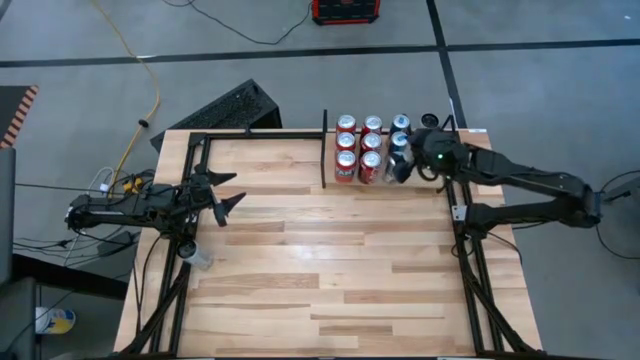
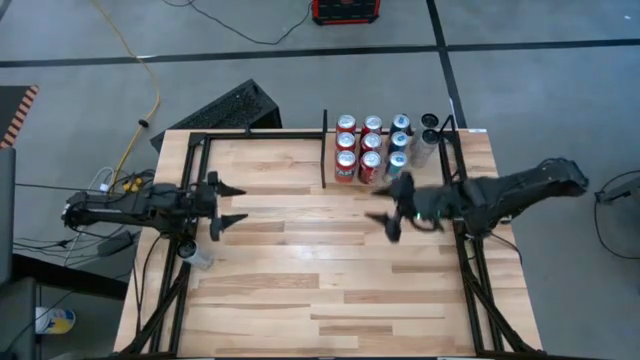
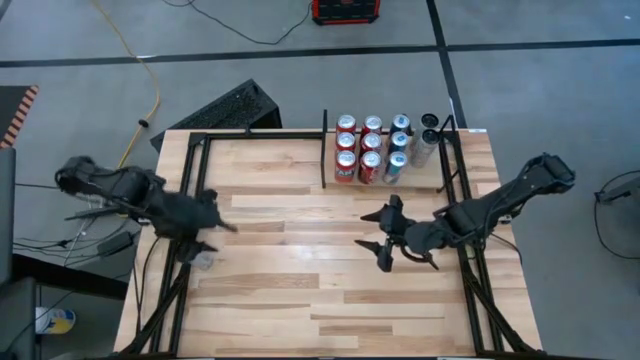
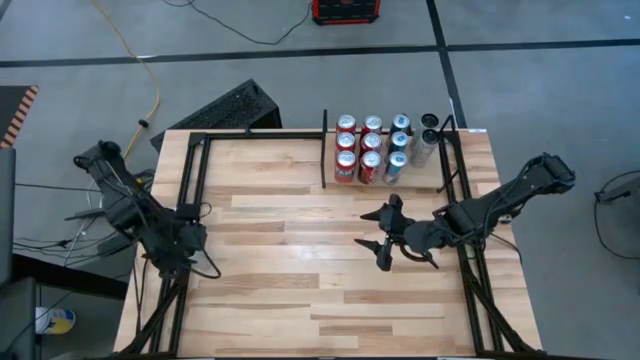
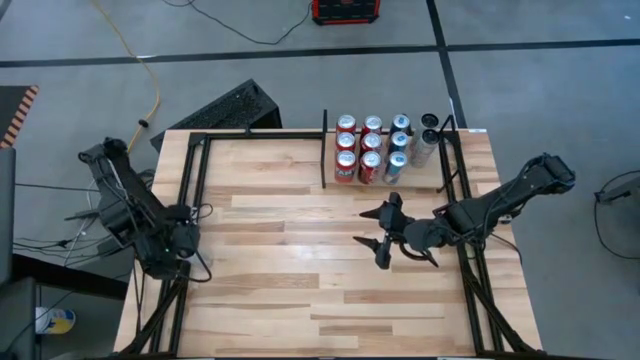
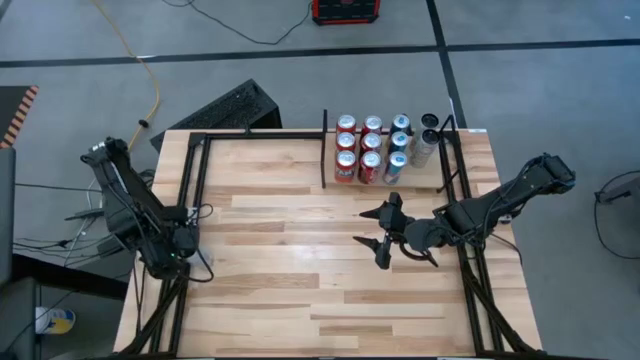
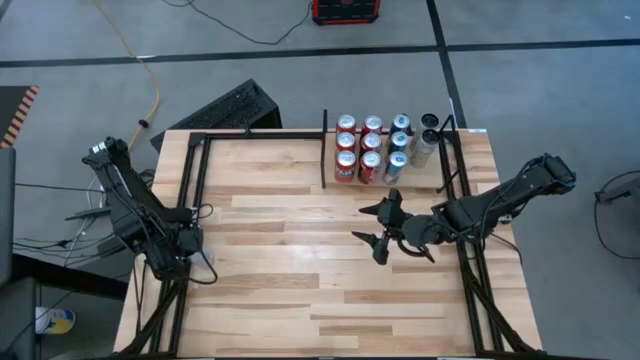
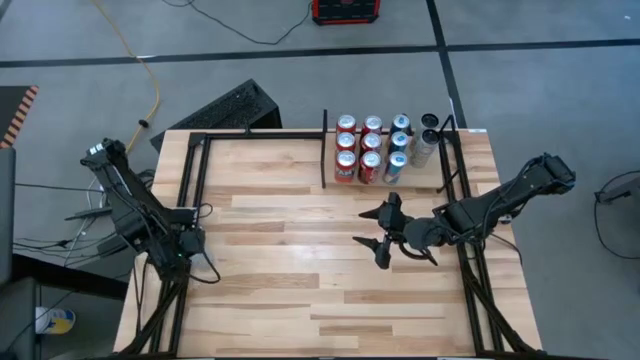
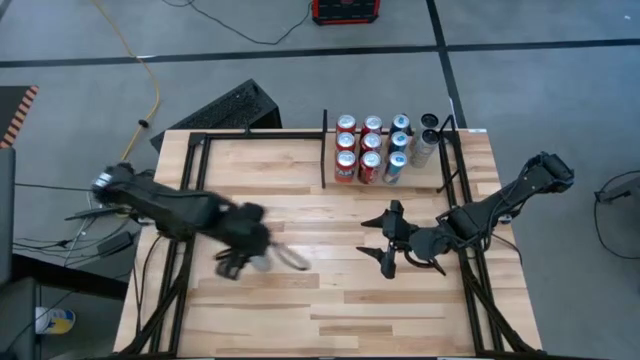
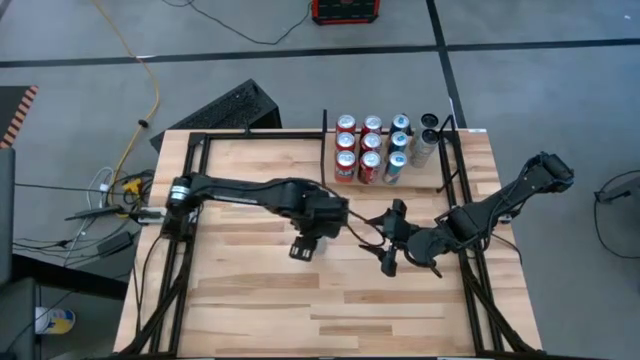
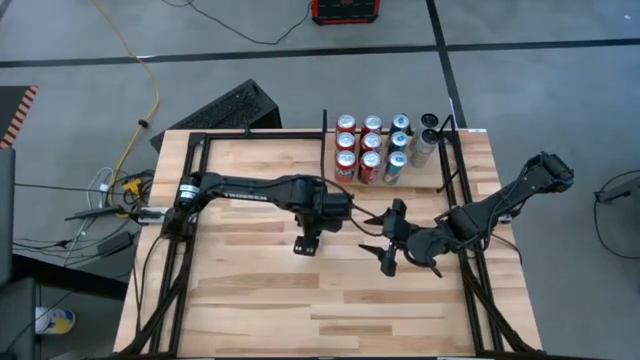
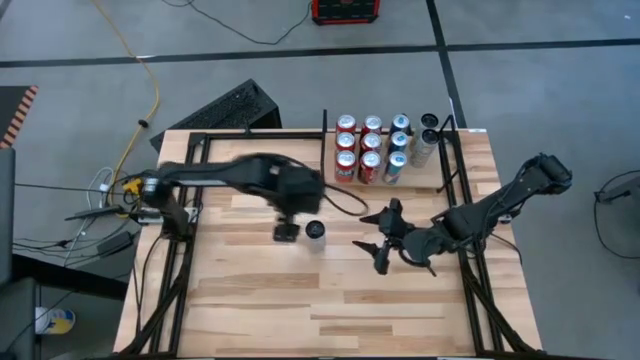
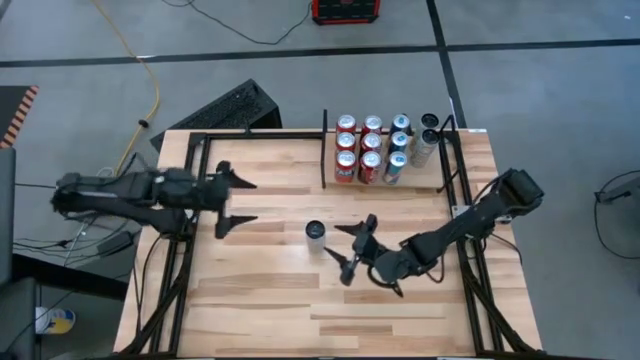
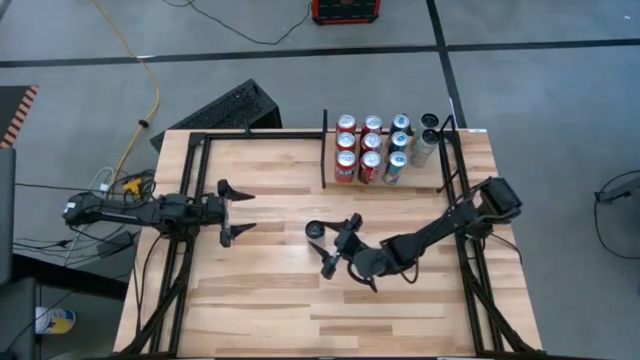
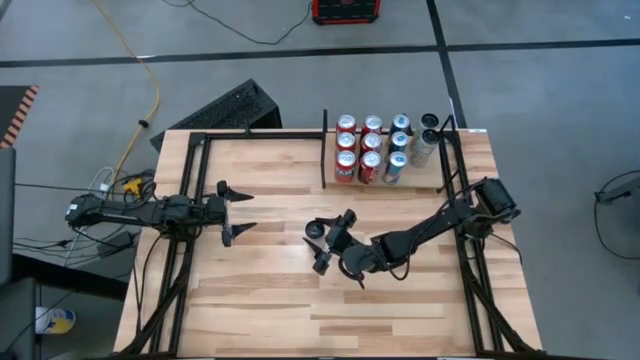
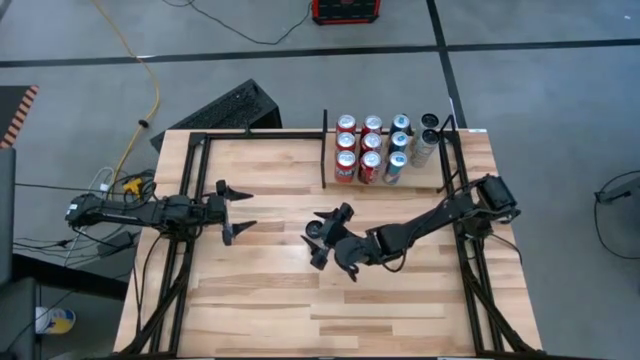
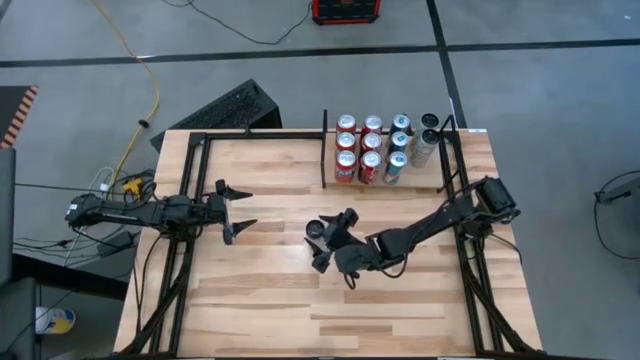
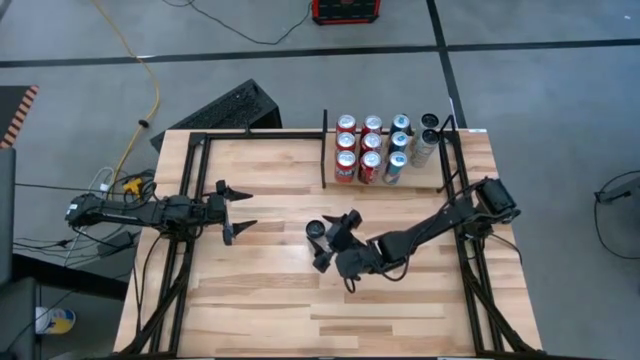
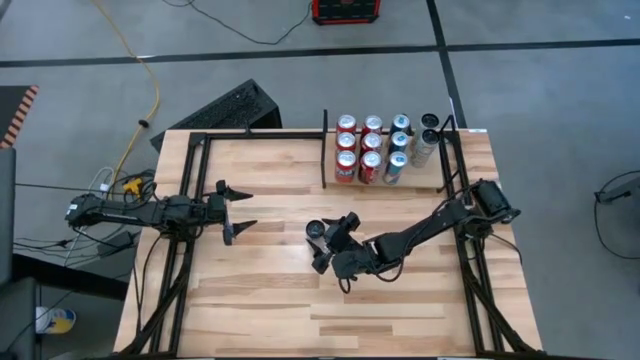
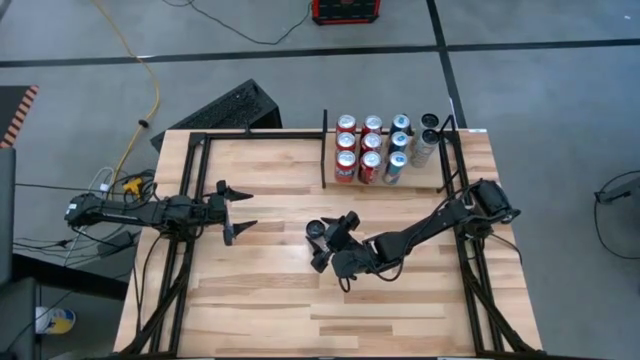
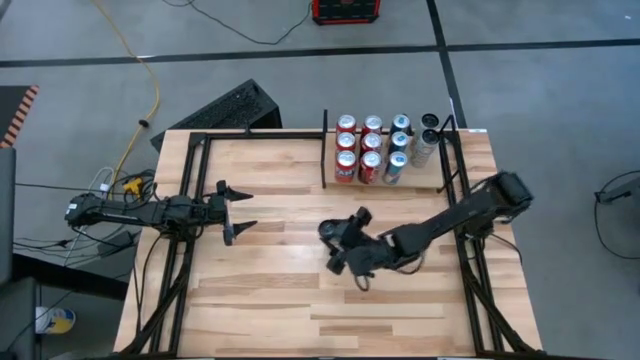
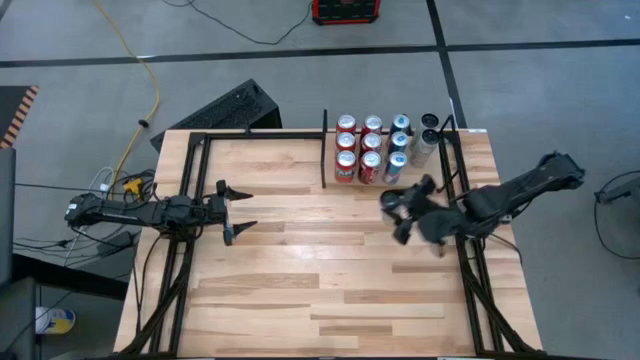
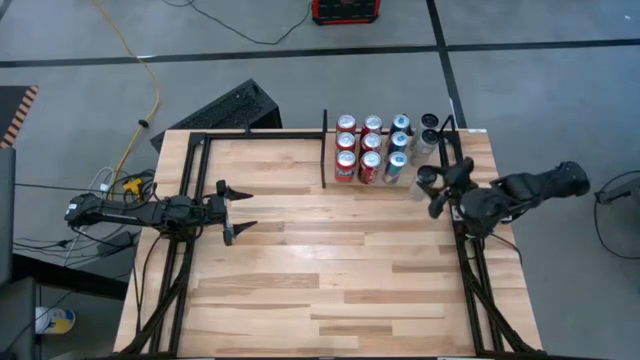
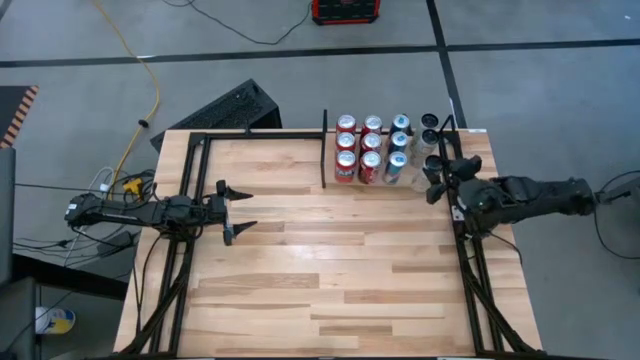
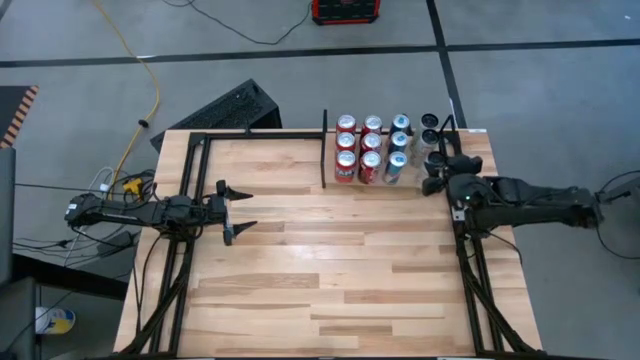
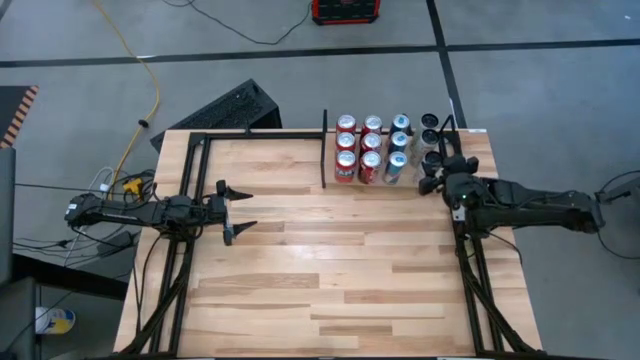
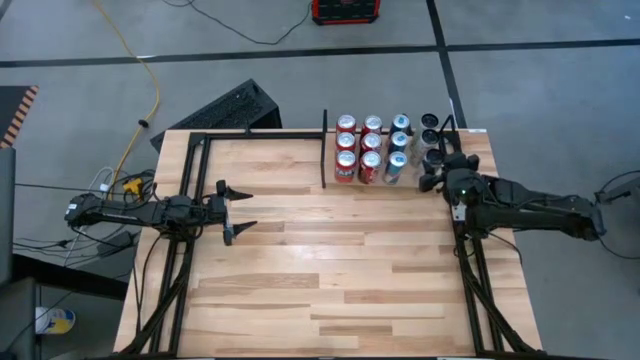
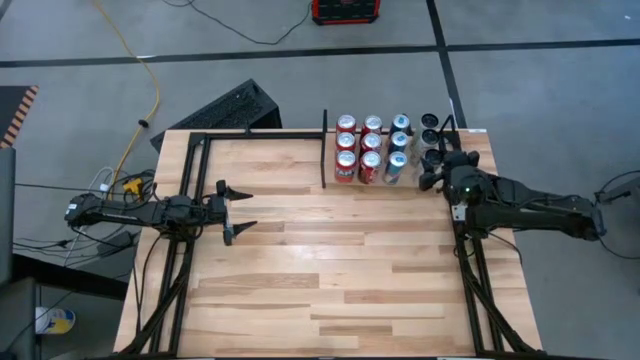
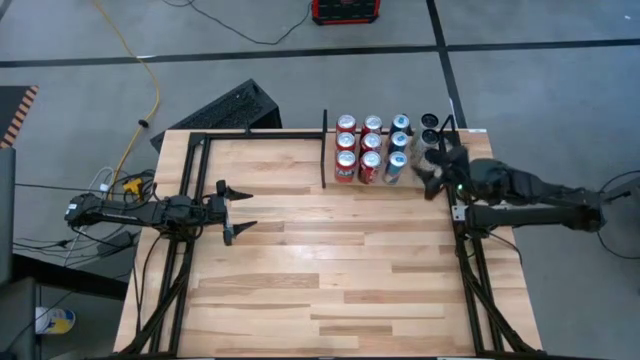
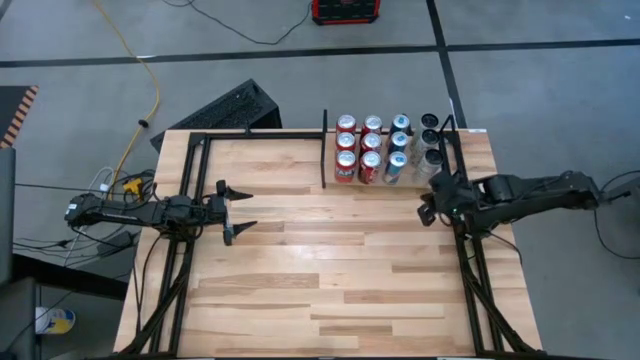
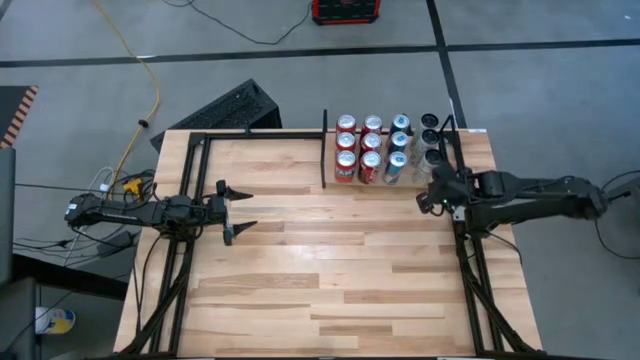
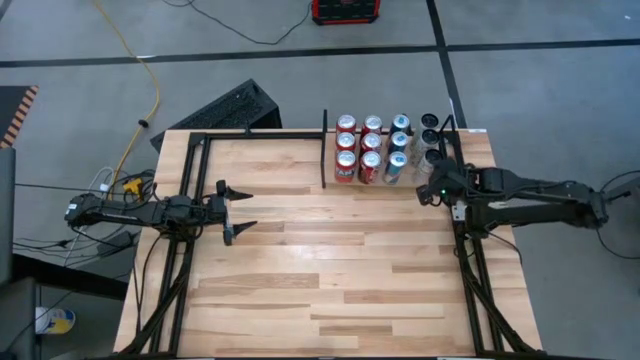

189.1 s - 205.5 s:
Task: Place canned beverage on shelf
Put the white-yellow soda can on the shelf aligned with the other soda cans

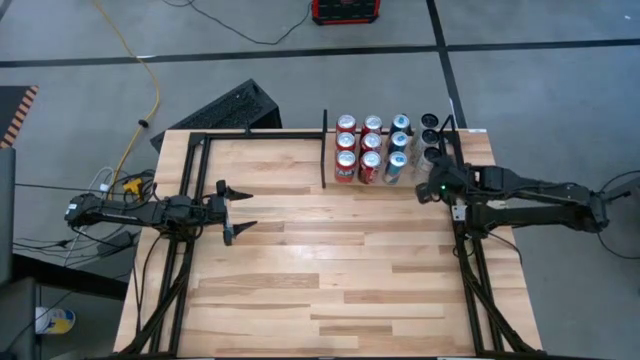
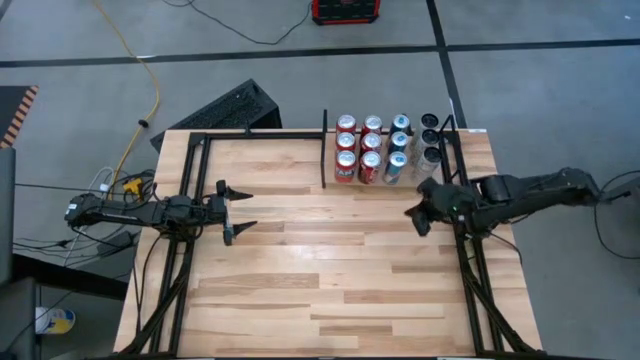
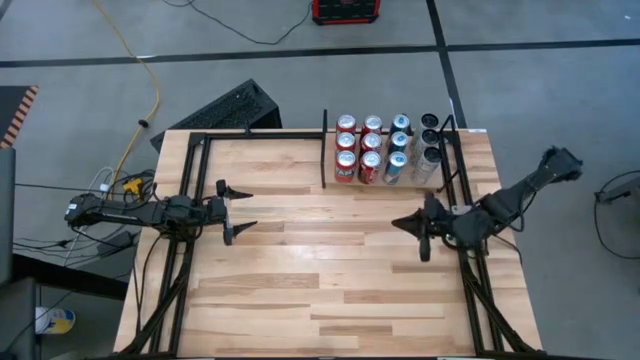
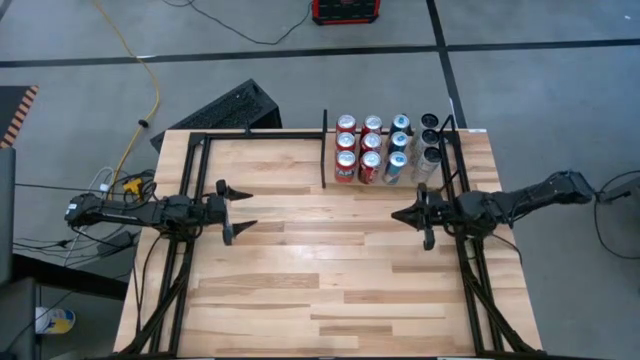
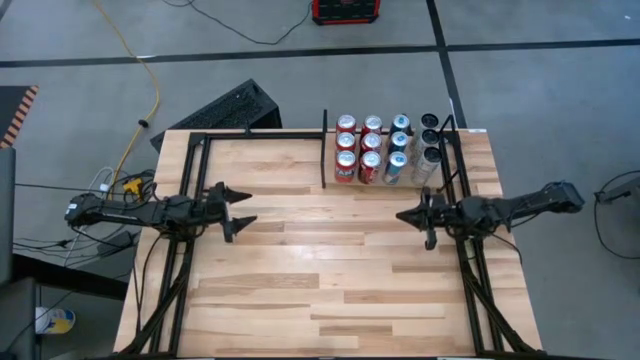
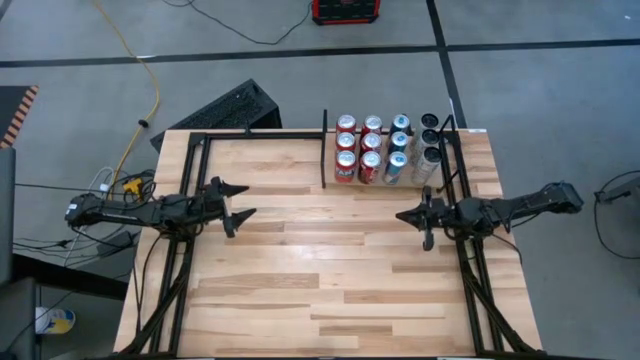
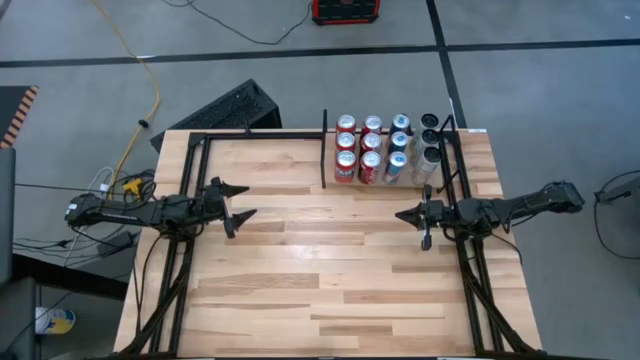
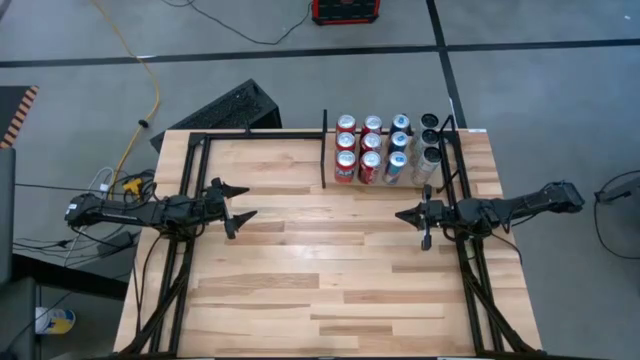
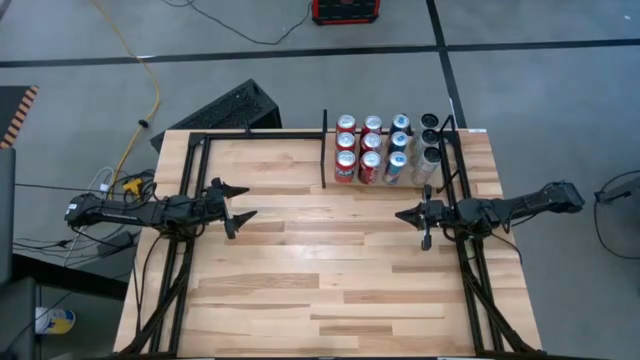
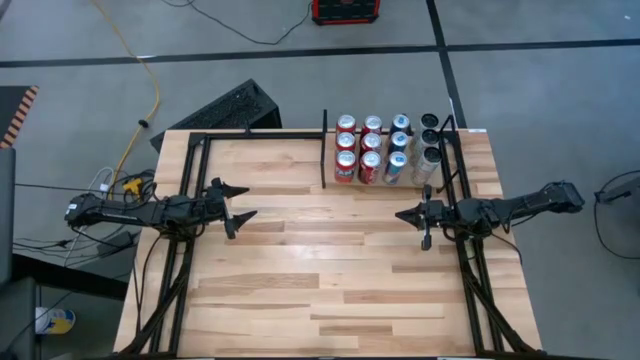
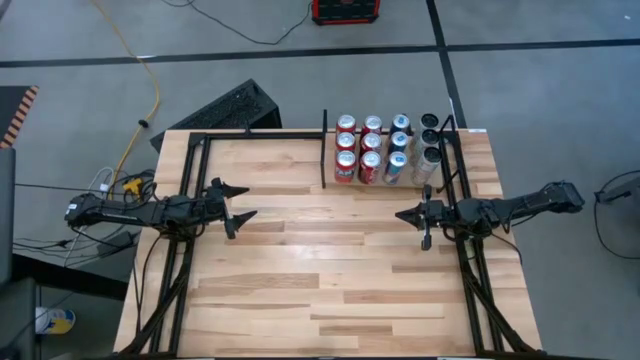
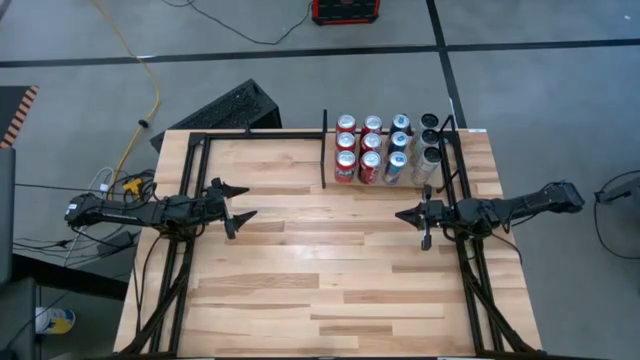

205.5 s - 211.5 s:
Return to Home Position
